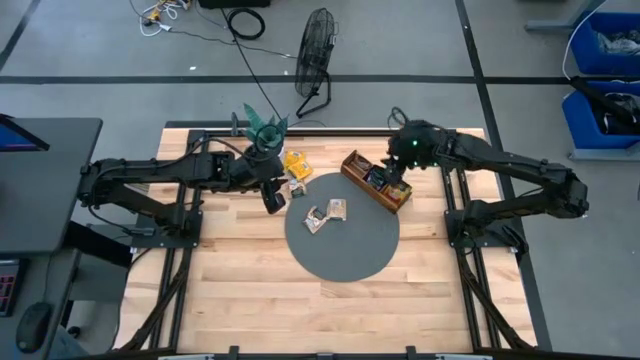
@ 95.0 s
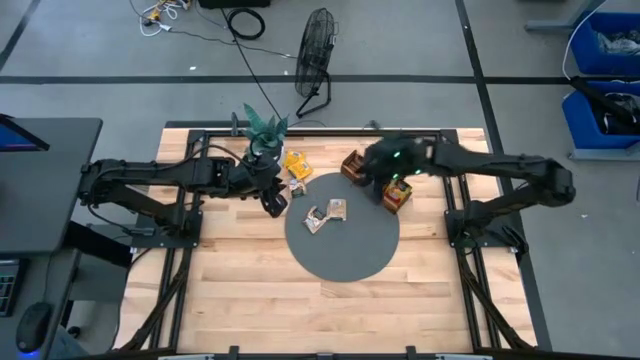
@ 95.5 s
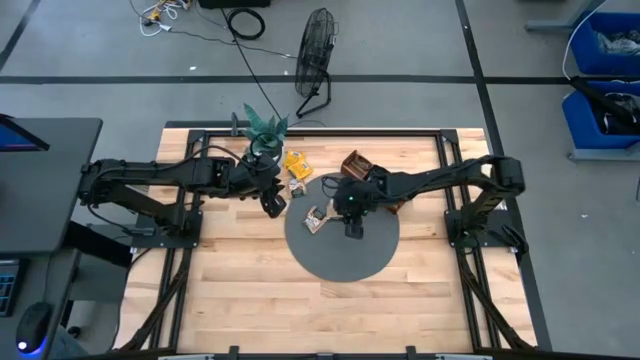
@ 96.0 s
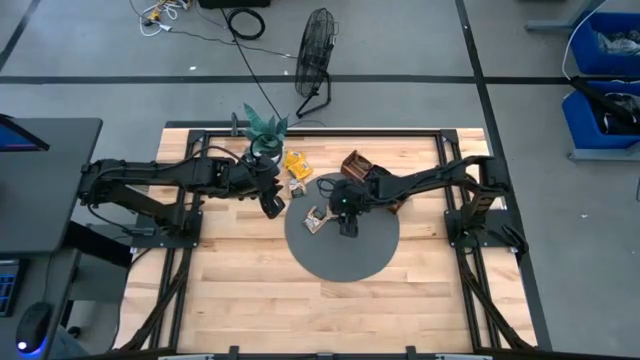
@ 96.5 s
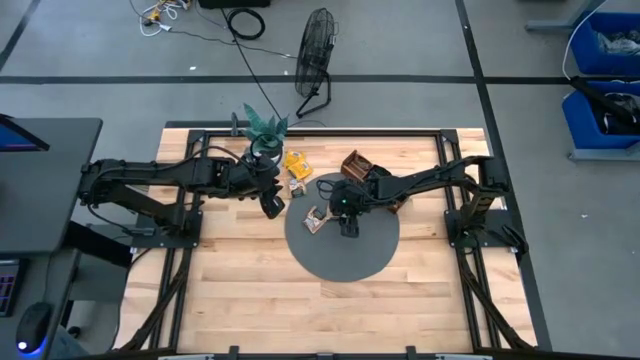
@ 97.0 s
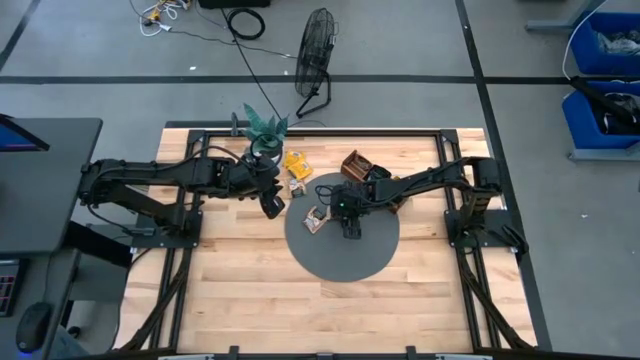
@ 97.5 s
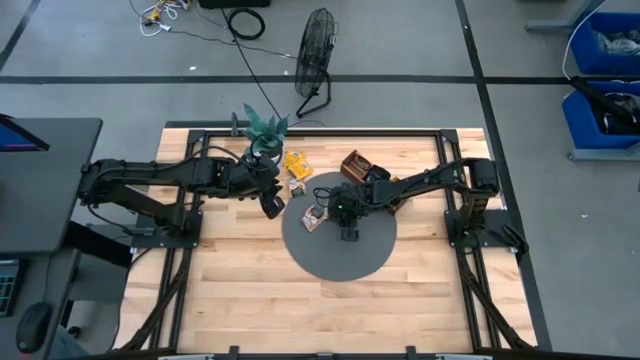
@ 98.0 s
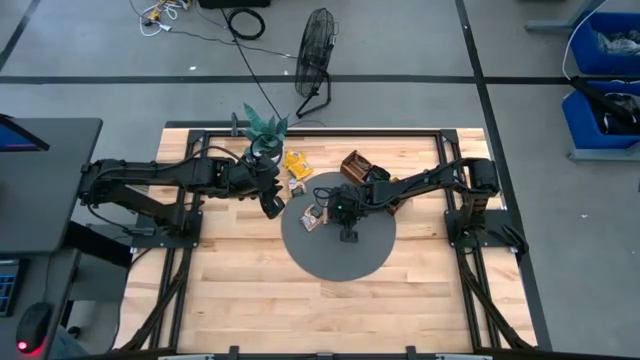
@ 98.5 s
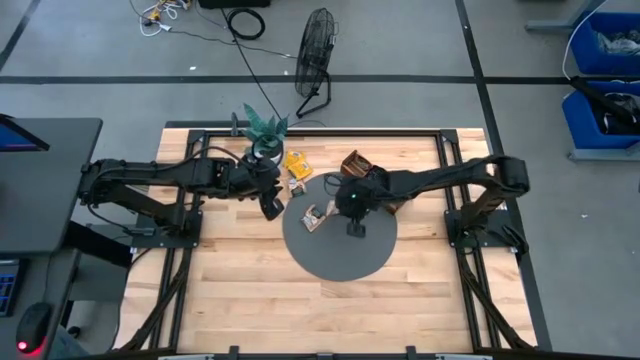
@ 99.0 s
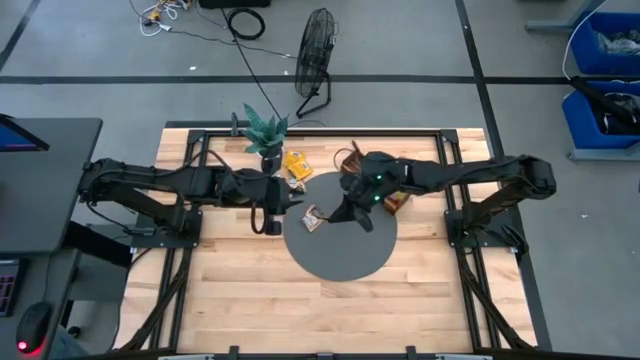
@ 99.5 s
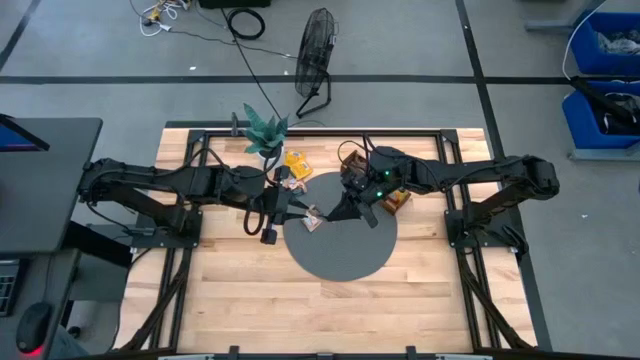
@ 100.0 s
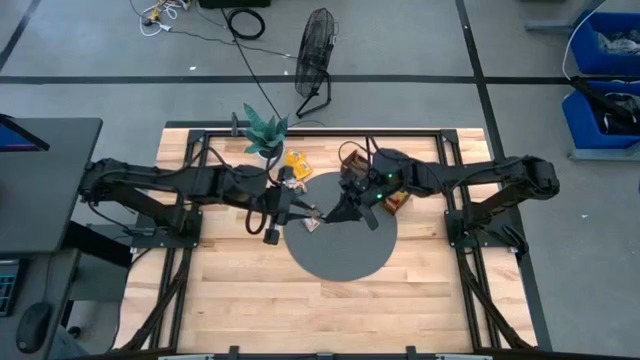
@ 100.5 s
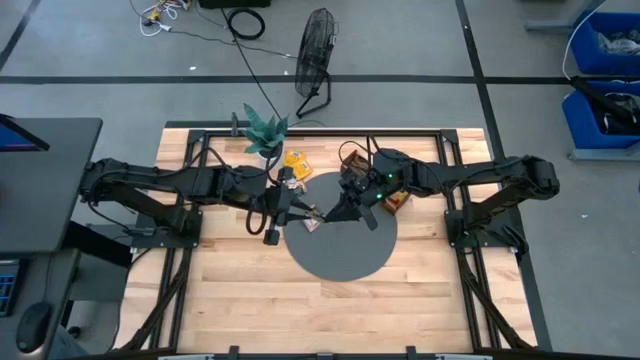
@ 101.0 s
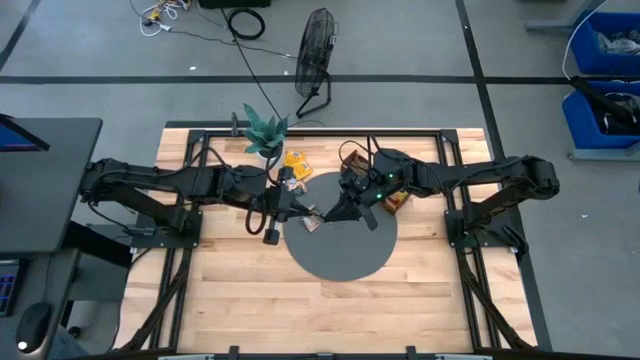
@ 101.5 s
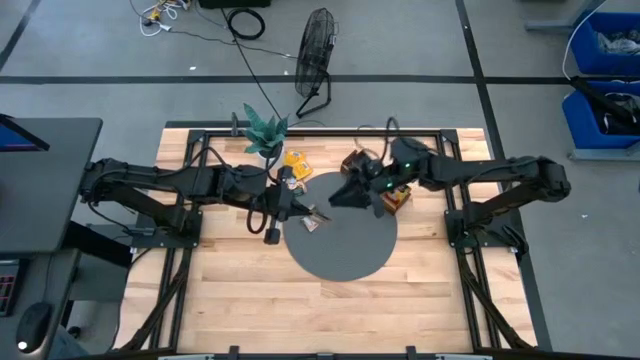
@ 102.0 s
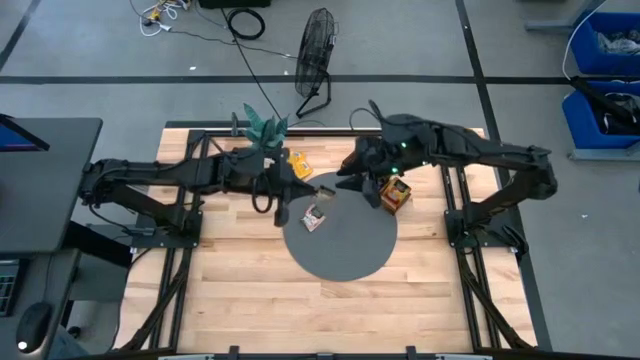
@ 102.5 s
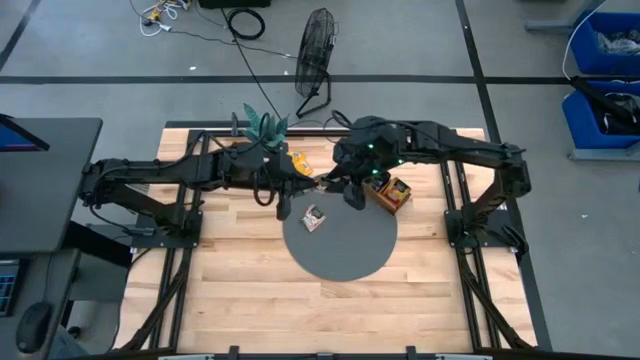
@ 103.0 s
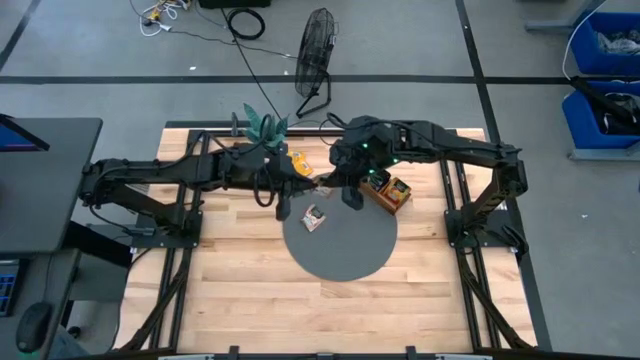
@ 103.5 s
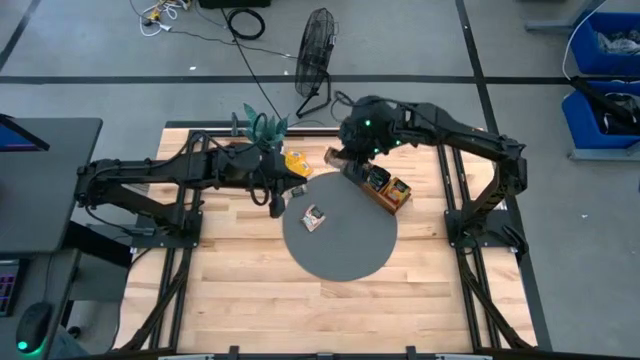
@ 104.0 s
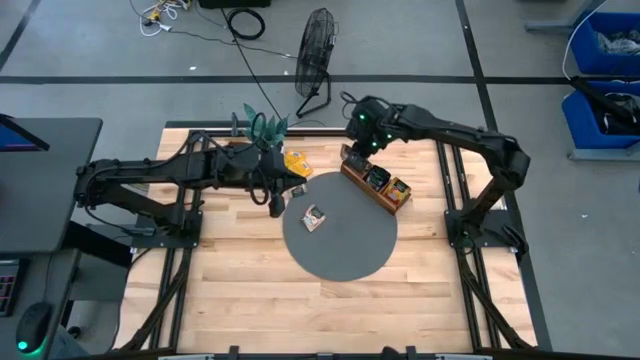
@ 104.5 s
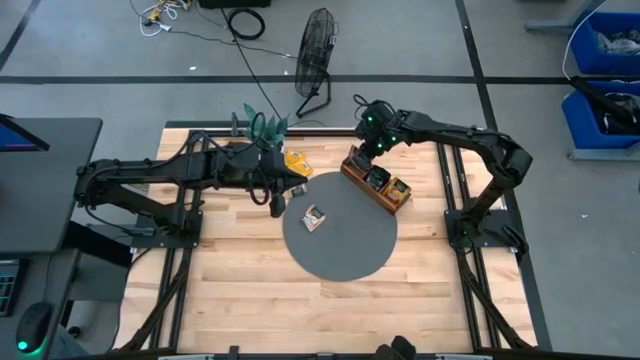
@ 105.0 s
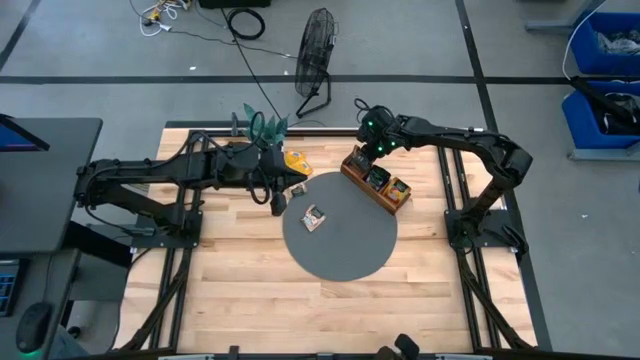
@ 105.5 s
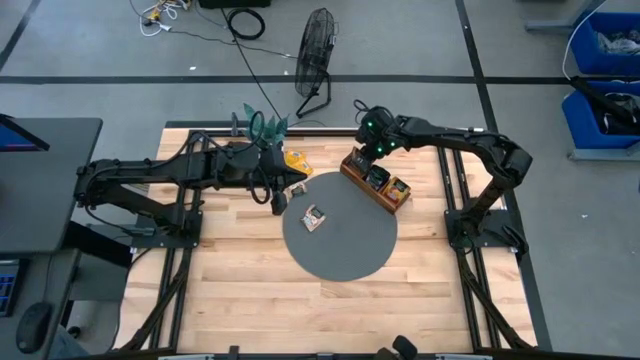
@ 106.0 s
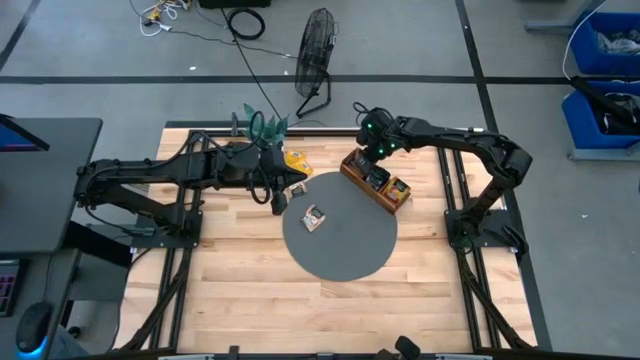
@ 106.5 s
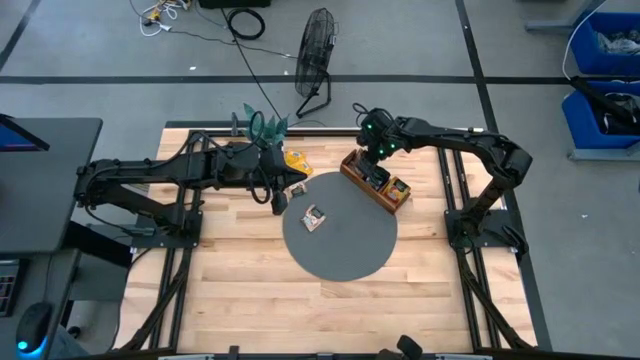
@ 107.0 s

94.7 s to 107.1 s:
Task: Pick & Place Tea
Put the brown tea bag into the left section of the wooden organizer

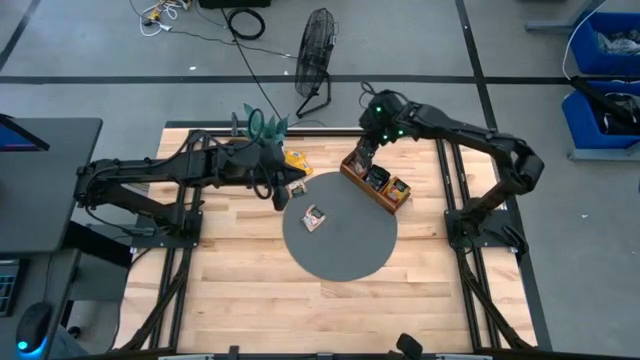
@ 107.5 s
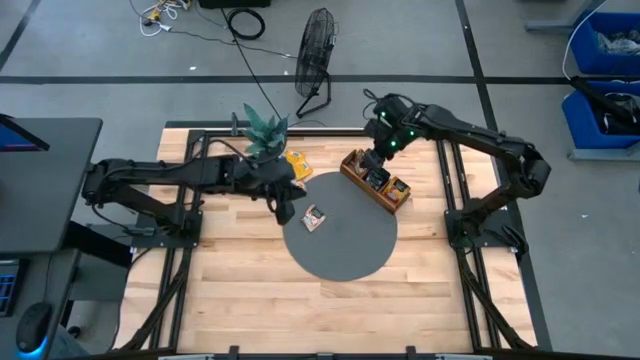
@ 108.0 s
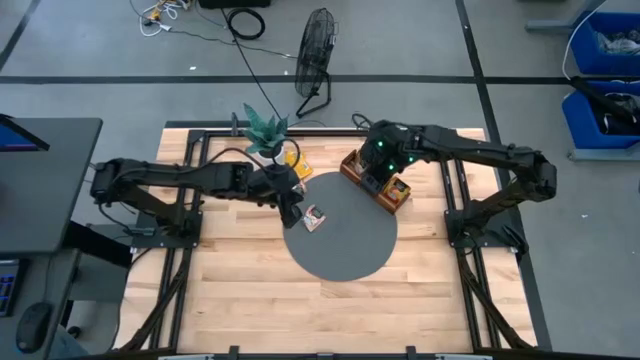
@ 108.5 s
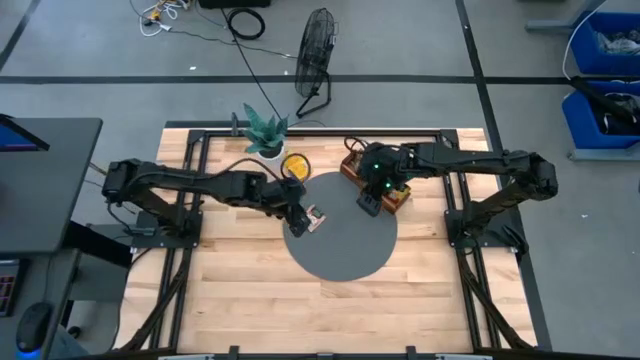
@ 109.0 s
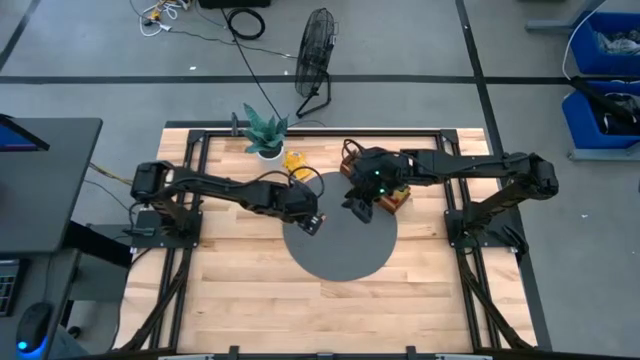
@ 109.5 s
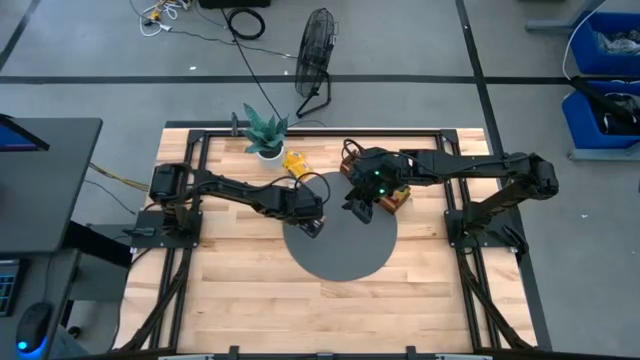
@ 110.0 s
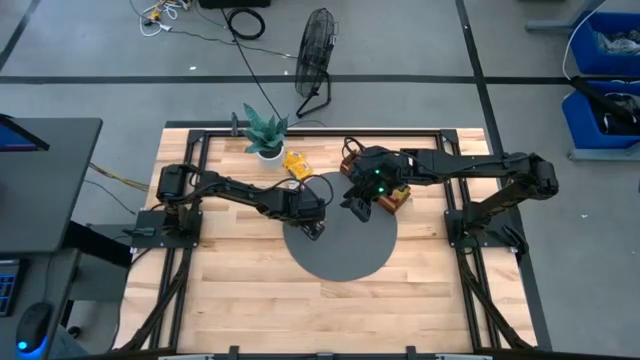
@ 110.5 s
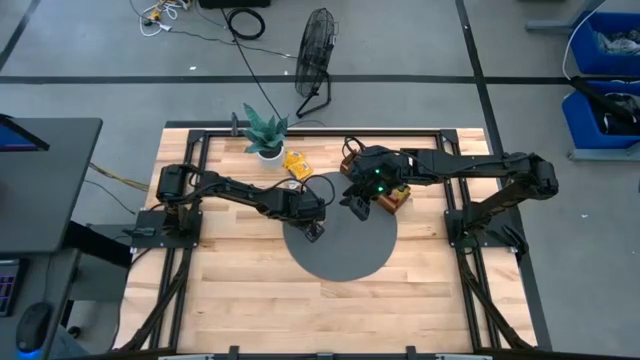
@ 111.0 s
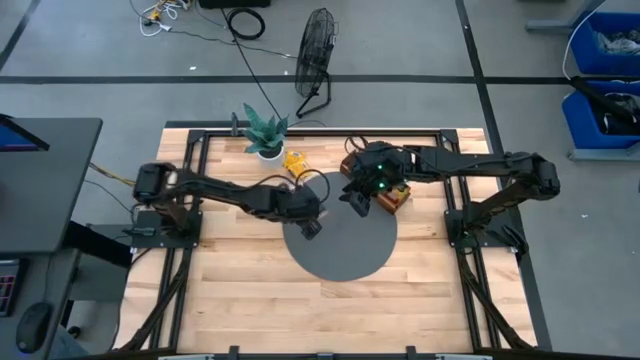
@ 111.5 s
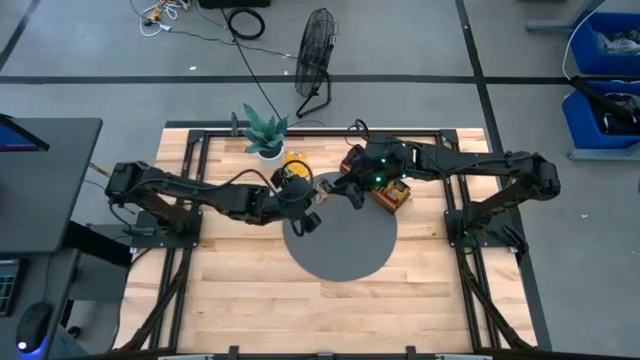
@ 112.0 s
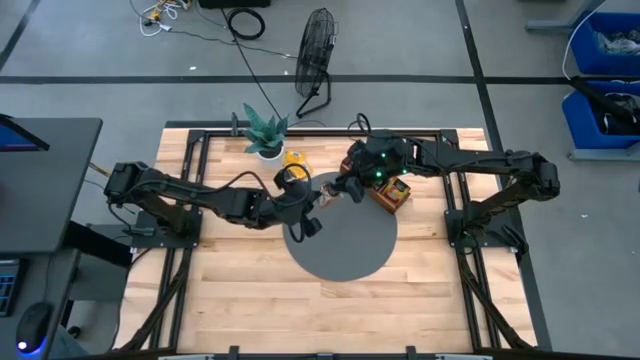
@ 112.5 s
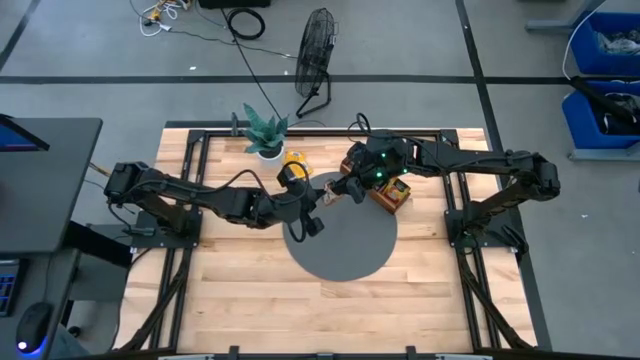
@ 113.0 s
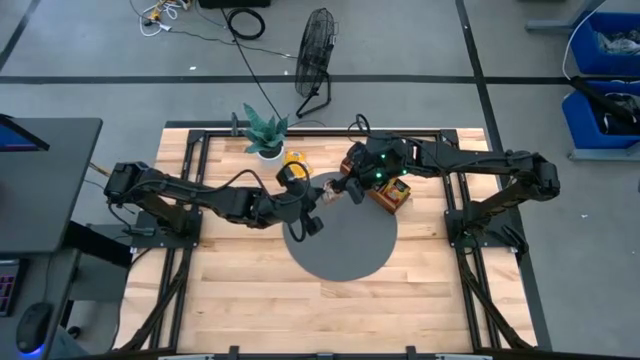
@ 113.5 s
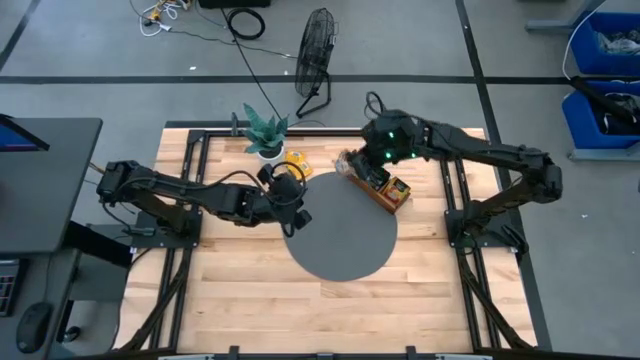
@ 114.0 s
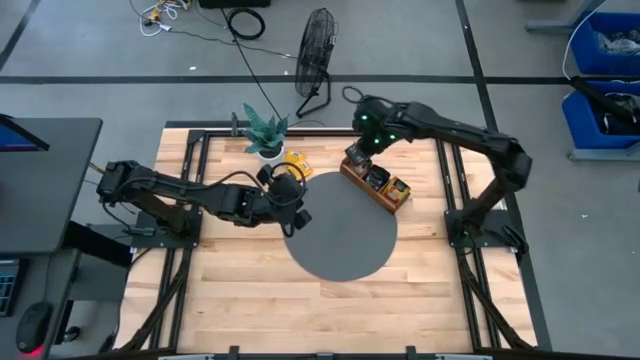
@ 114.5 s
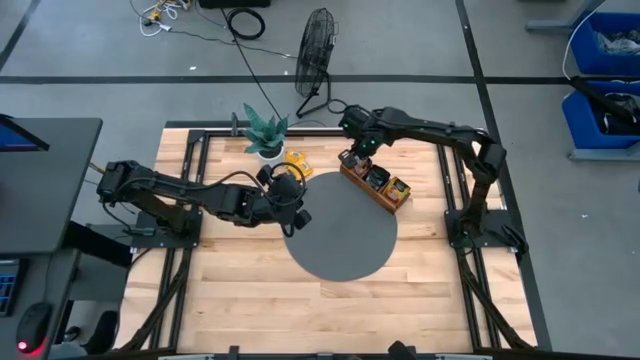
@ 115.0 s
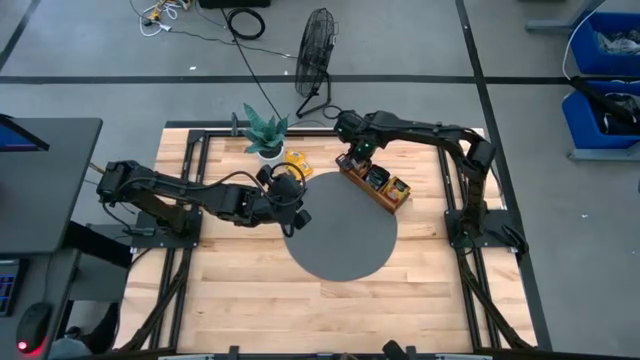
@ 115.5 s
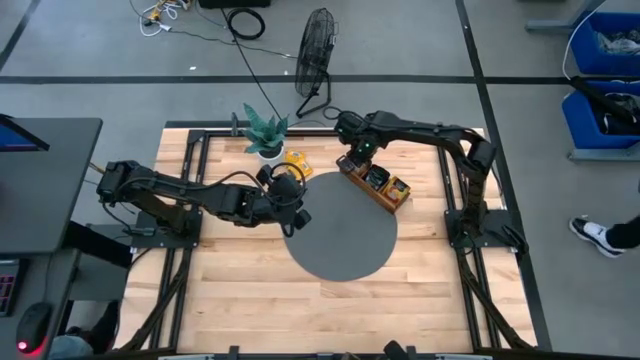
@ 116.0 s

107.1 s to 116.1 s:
Put the brown tea bag into the left section of the wooden organizer
